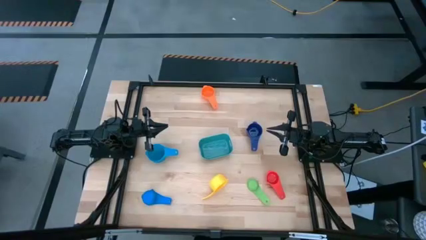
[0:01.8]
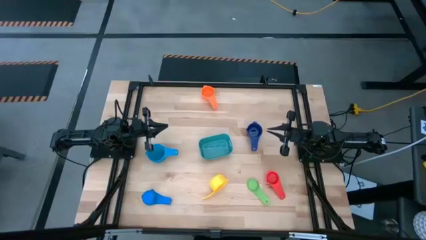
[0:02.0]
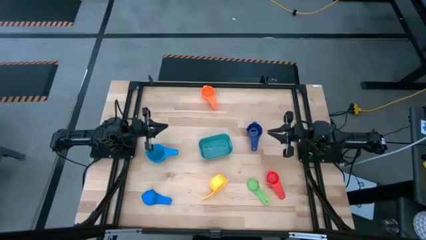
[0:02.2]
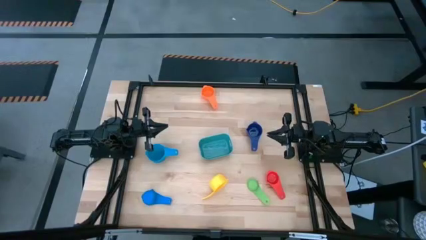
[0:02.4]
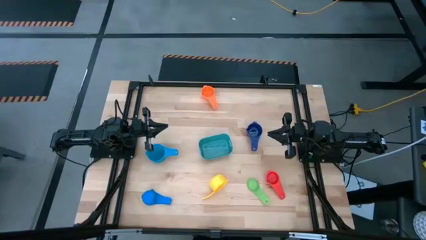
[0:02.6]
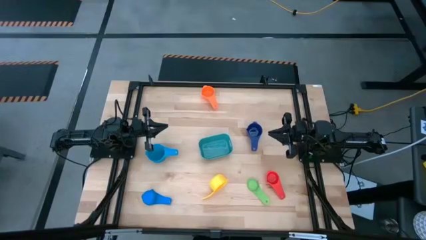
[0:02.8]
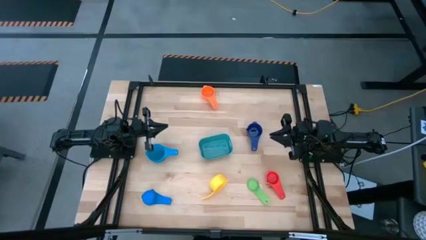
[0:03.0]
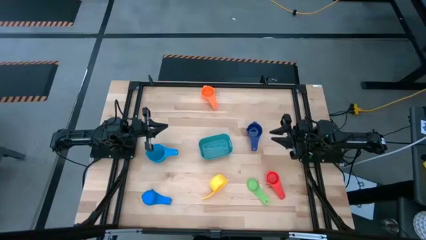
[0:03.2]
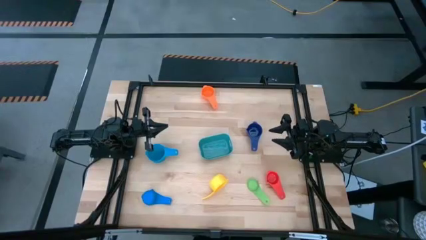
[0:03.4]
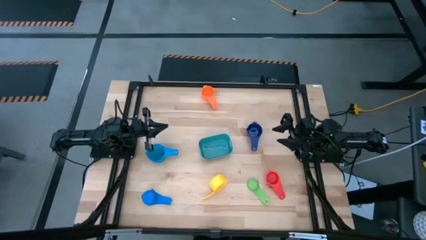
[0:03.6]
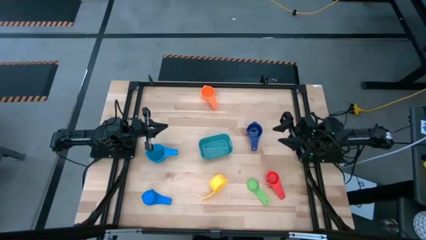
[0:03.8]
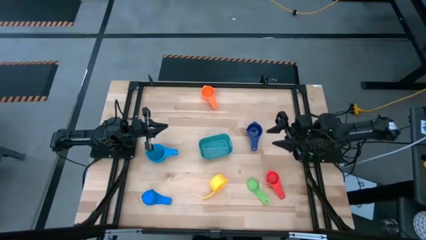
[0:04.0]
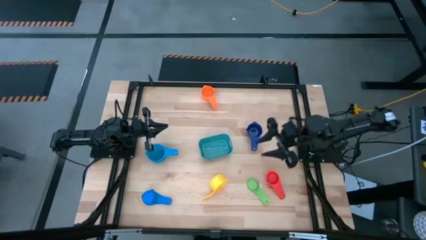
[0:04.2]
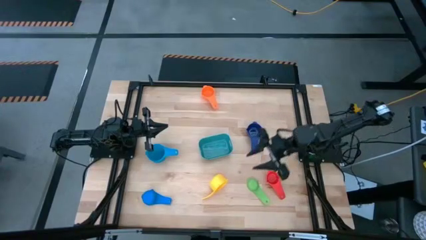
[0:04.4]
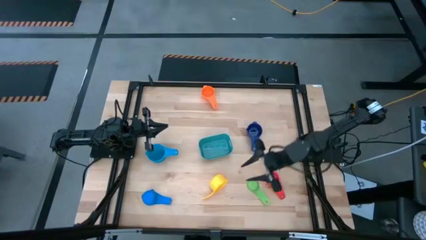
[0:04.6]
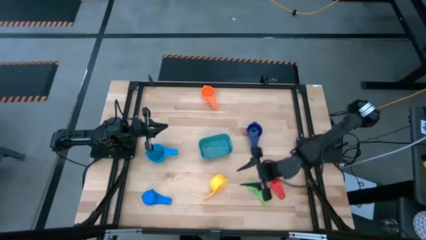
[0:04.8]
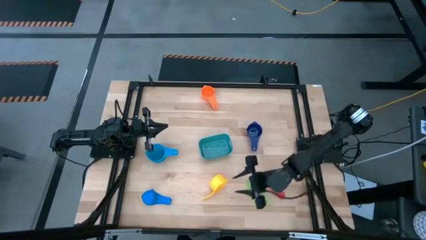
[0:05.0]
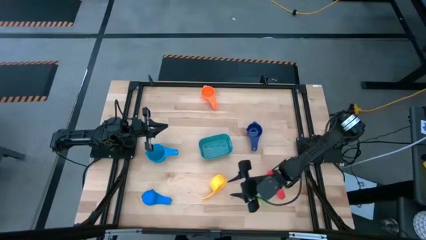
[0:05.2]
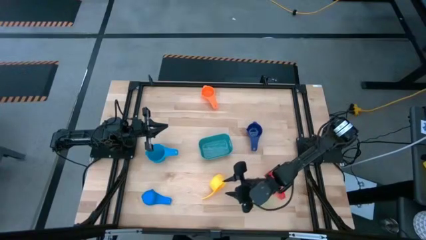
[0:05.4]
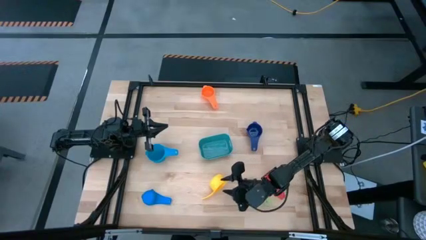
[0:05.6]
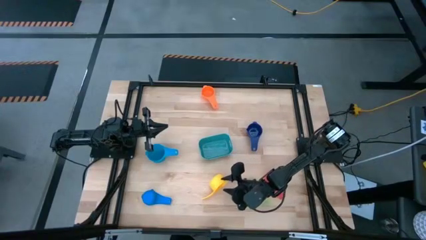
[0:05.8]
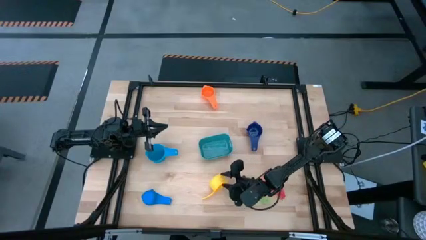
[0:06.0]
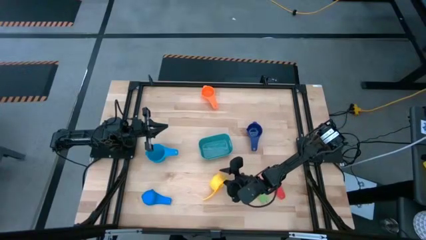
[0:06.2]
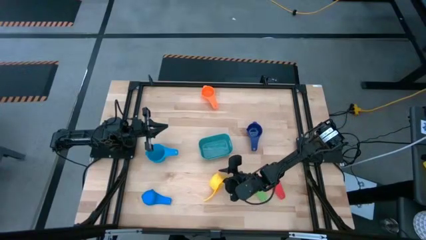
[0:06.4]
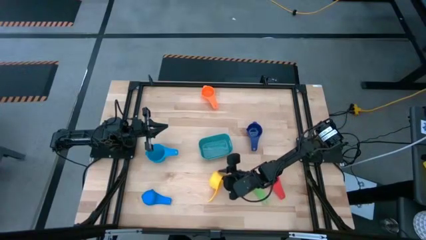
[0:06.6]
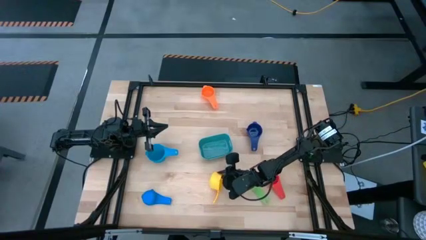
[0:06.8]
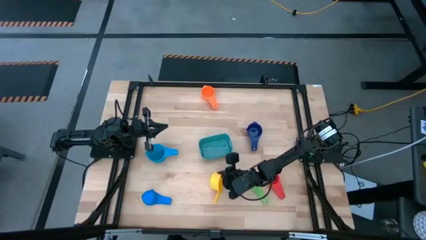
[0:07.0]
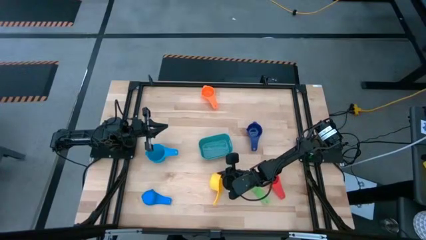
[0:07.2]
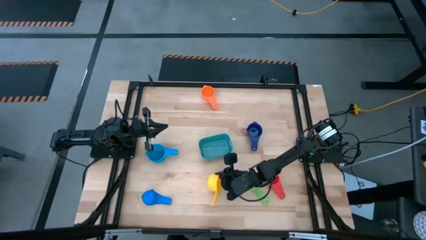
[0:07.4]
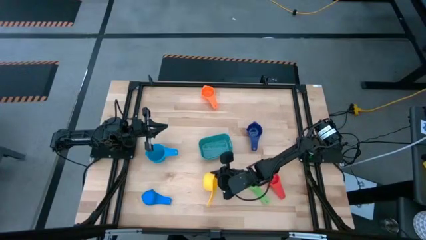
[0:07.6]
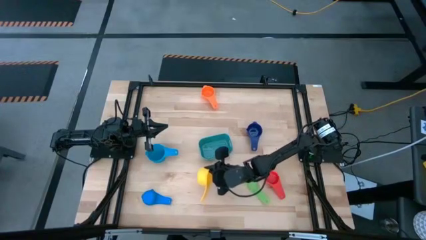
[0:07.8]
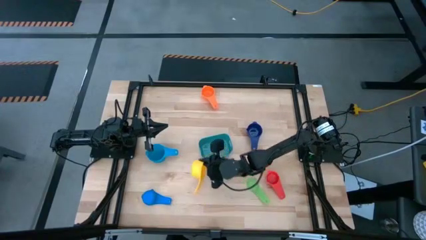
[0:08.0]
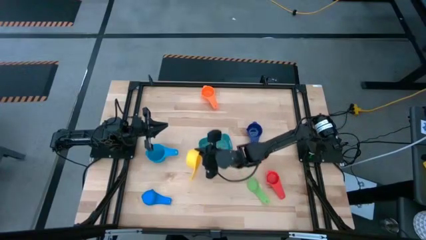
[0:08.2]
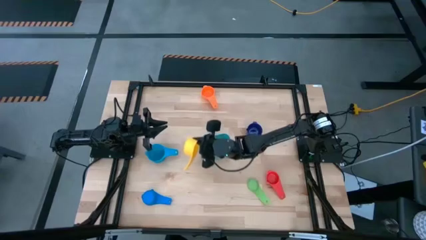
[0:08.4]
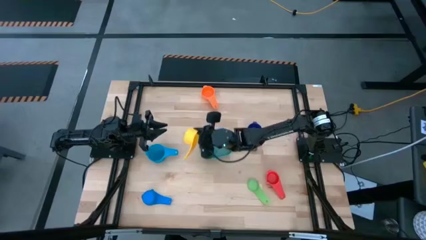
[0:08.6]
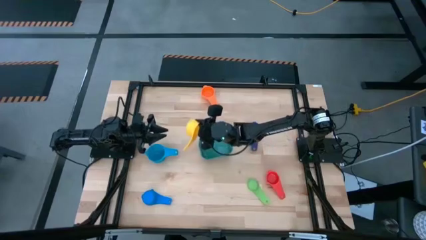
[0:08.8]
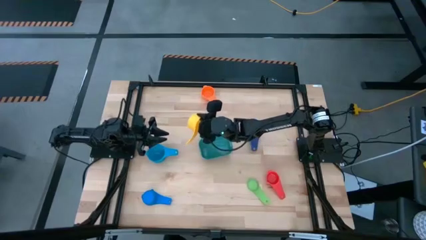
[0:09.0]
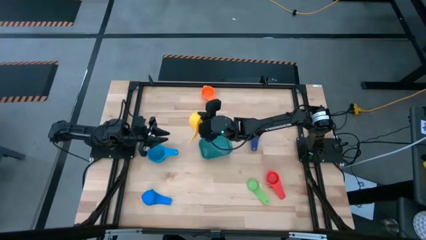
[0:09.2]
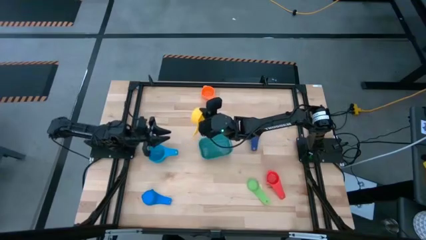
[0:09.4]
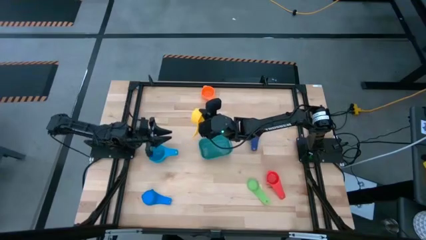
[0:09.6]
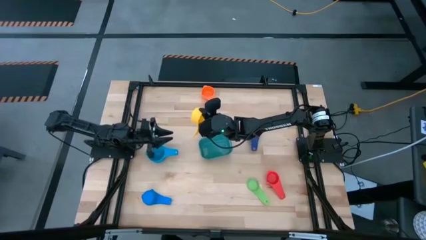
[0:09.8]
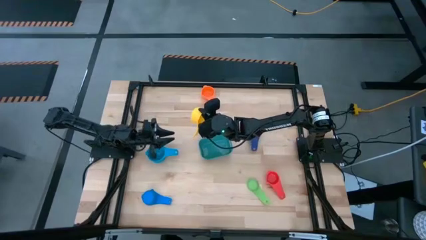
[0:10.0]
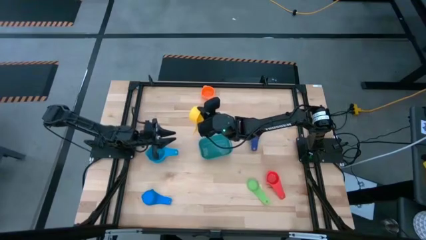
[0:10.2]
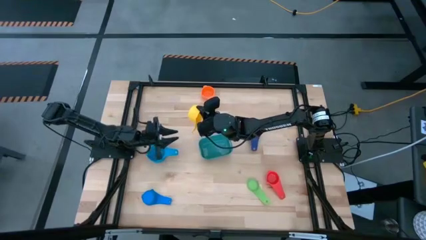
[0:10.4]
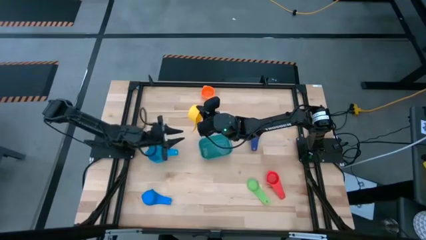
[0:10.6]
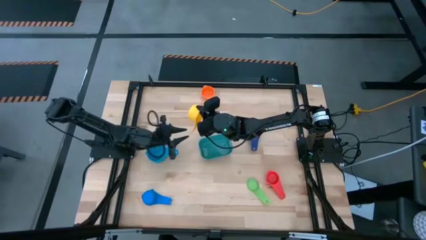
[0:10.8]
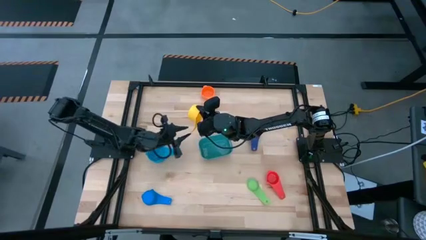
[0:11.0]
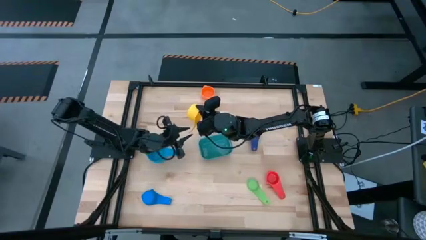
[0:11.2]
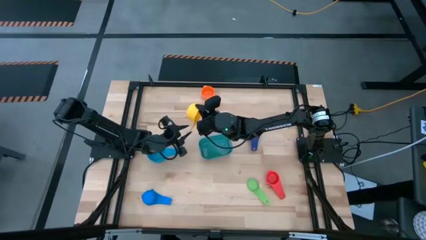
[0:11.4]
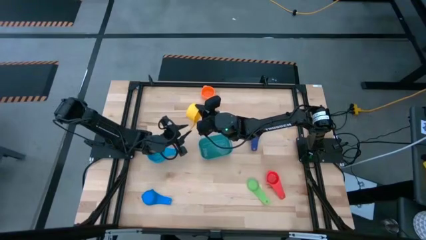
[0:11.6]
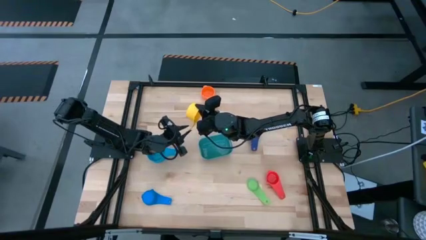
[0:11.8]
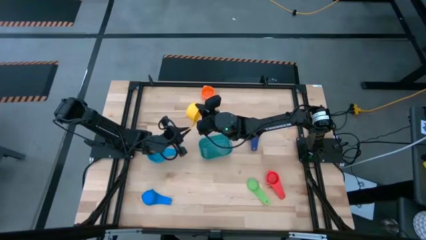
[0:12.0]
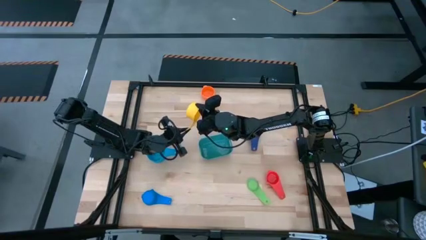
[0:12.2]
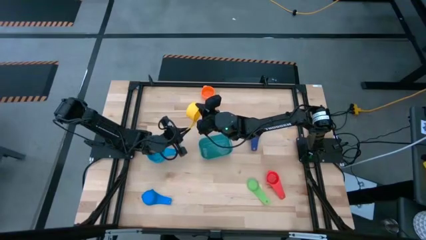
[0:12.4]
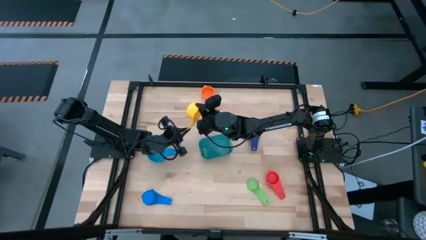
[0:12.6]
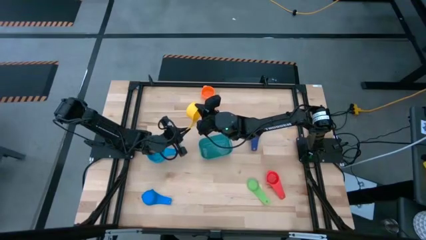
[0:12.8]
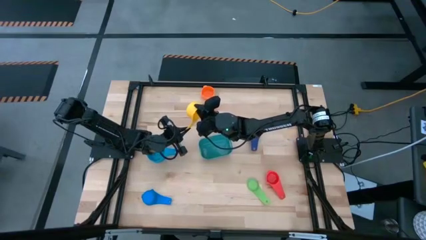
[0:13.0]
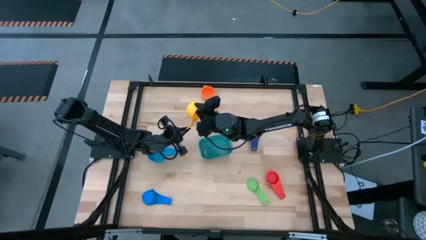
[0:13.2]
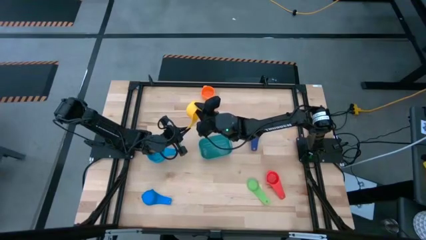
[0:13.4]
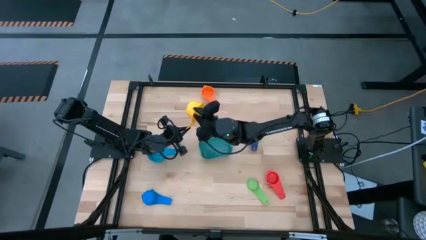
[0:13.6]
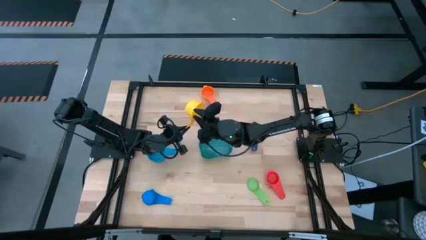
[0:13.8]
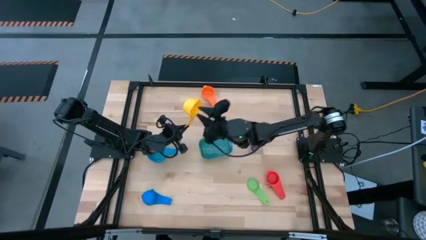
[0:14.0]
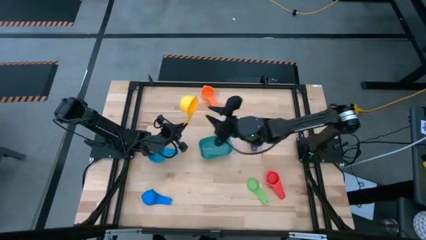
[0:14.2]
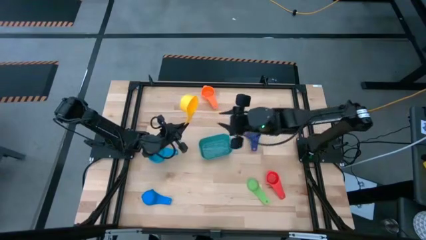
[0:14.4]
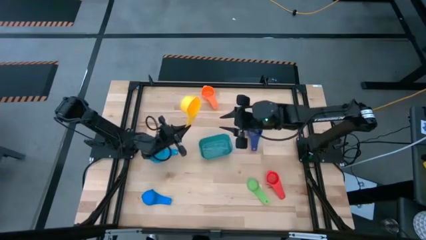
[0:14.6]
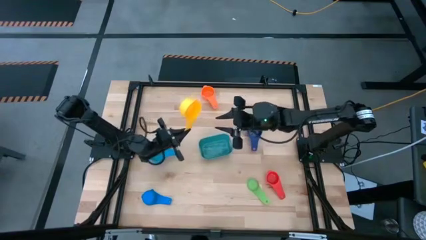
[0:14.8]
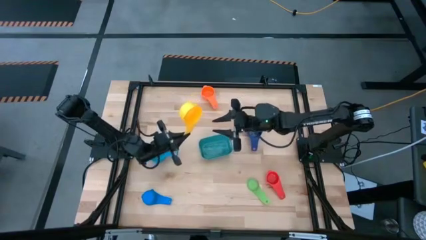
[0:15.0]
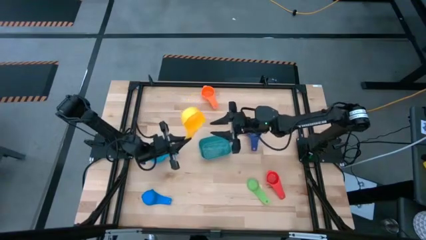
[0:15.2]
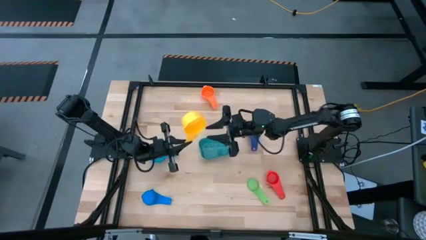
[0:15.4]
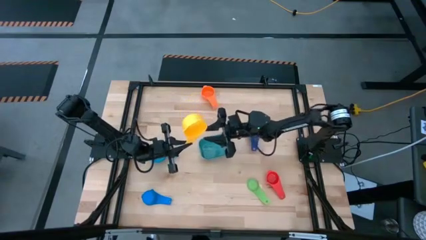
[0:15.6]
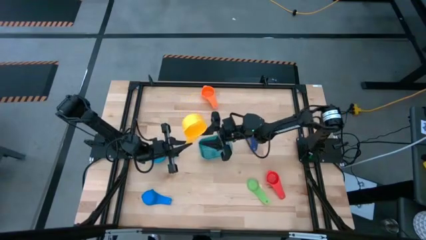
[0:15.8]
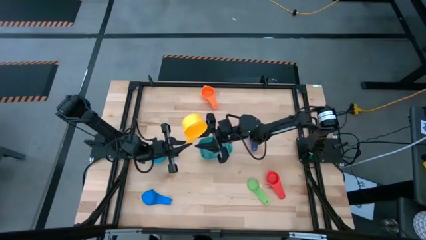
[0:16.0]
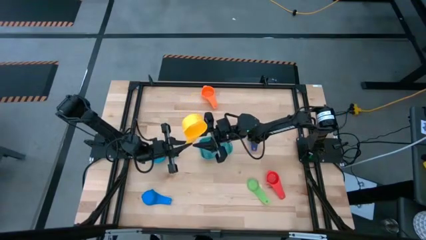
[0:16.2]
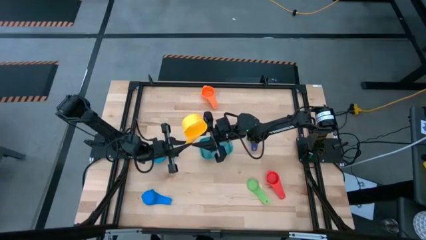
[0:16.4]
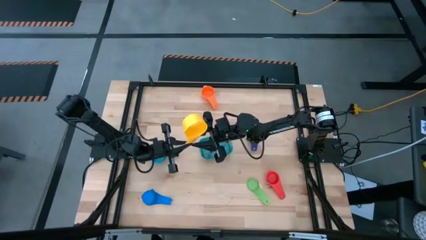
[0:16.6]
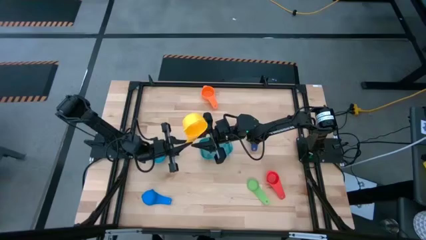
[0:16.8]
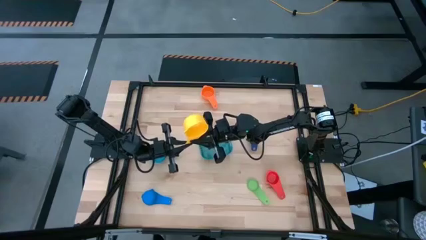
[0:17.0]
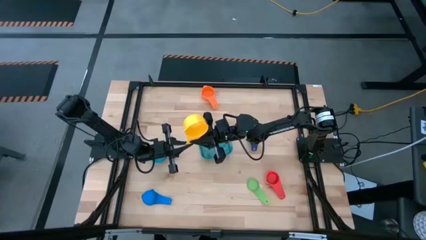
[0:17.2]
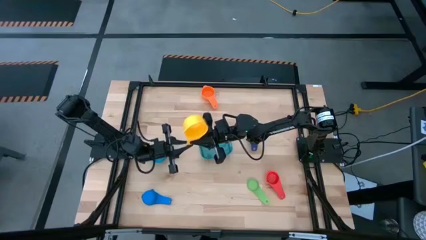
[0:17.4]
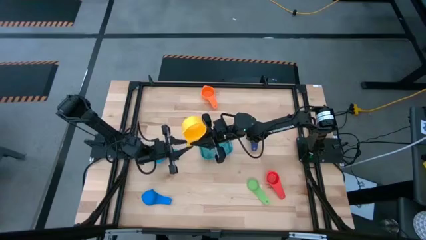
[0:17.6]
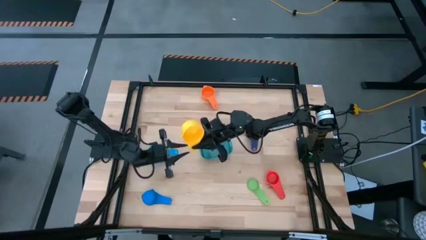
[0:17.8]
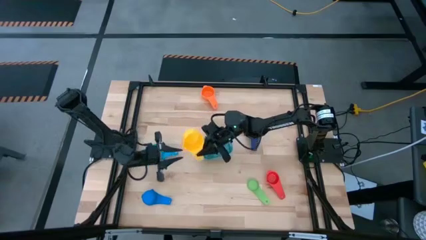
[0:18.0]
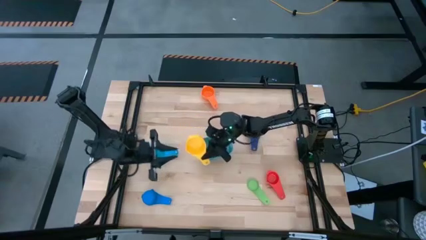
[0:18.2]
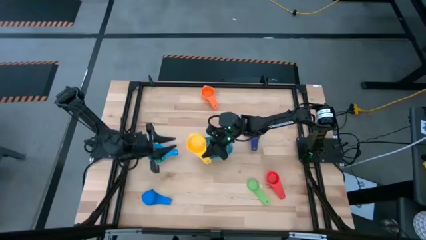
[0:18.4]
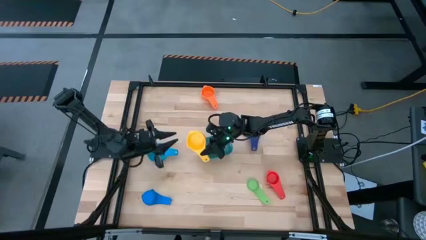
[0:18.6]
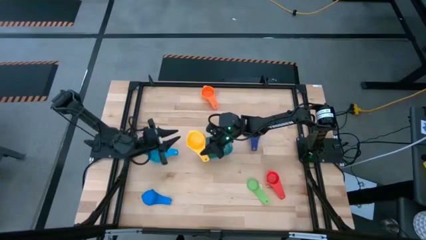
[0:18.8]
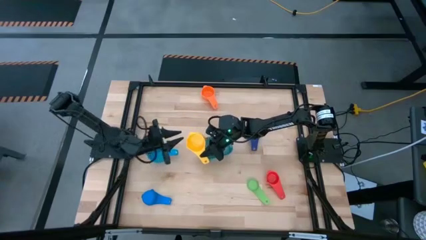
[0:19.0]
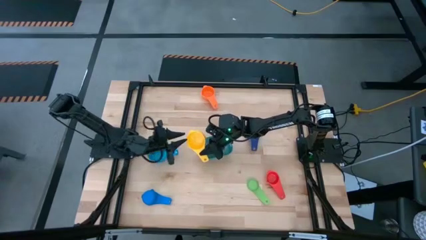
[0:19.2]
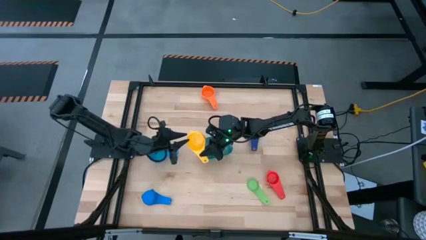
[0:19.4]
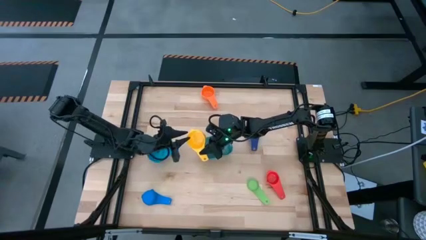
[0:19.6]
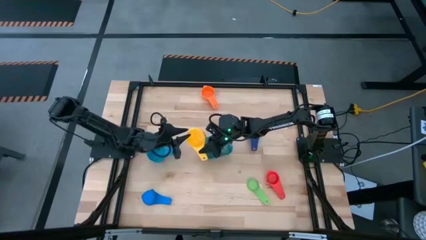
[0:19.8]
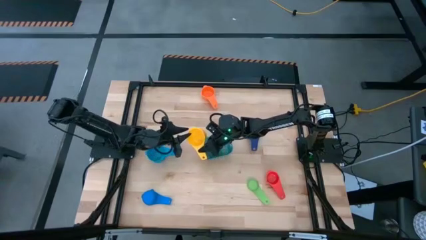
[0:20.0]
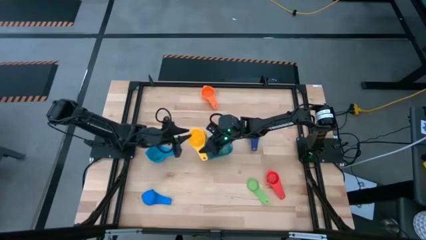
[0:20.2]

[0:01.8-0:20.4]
Task: Nest measuring cups in basket
Stack the yellow measuring cup on top of the light blue measuring cup
